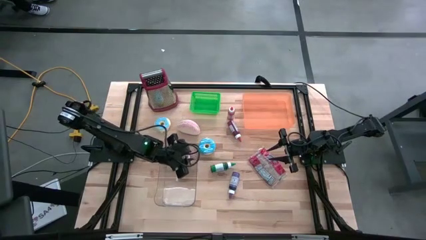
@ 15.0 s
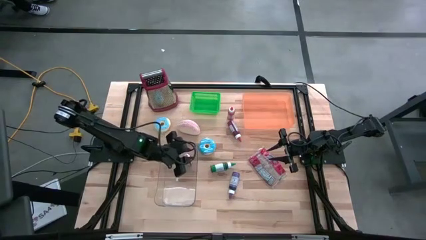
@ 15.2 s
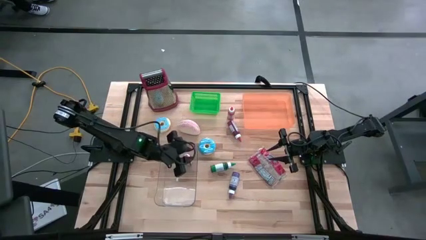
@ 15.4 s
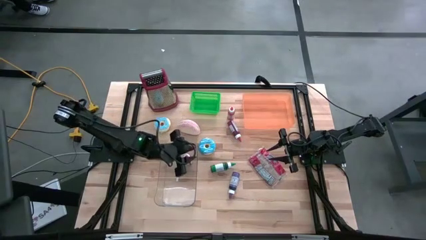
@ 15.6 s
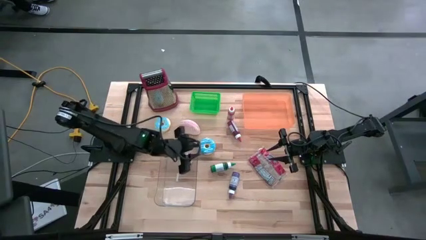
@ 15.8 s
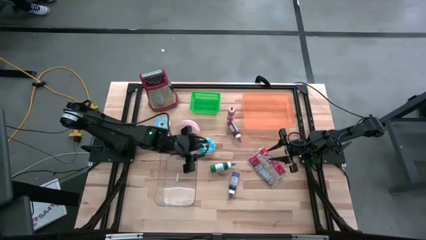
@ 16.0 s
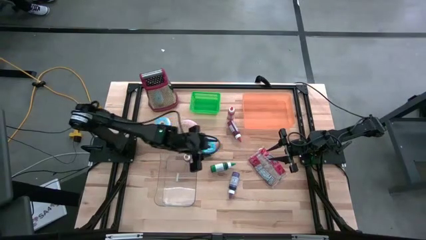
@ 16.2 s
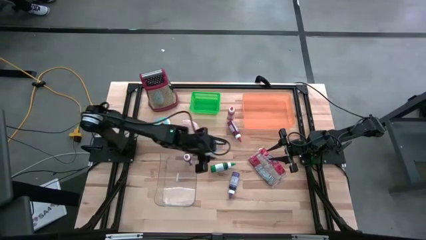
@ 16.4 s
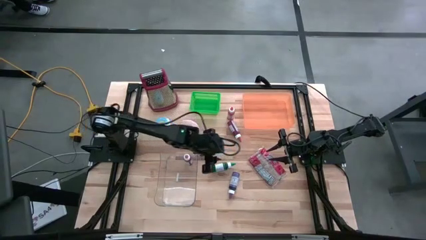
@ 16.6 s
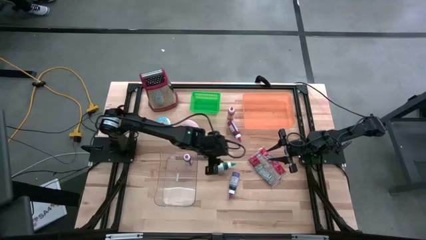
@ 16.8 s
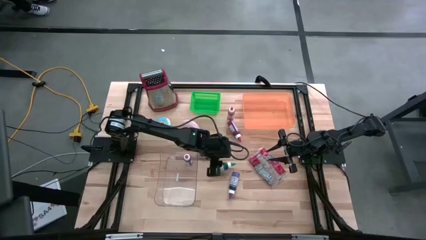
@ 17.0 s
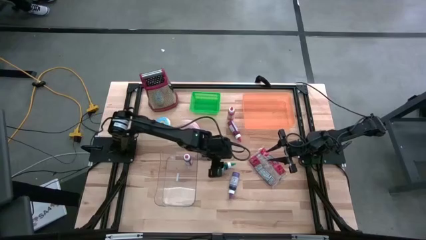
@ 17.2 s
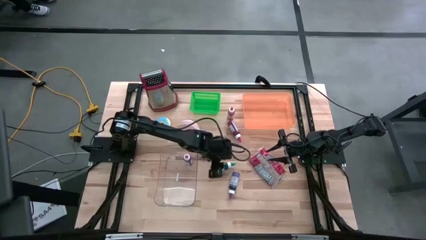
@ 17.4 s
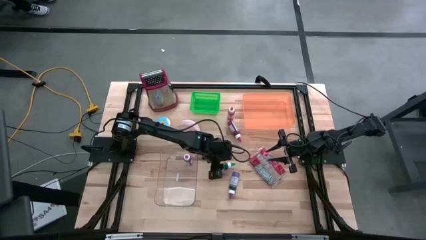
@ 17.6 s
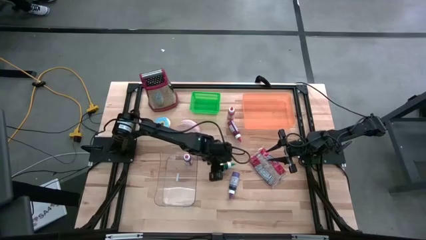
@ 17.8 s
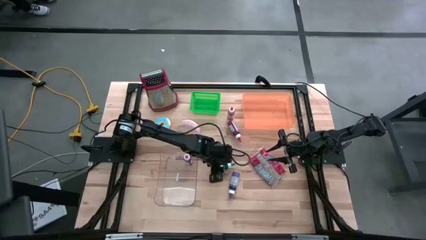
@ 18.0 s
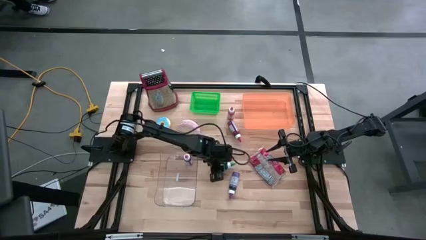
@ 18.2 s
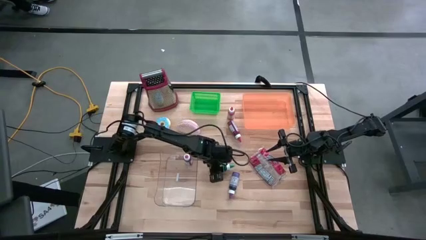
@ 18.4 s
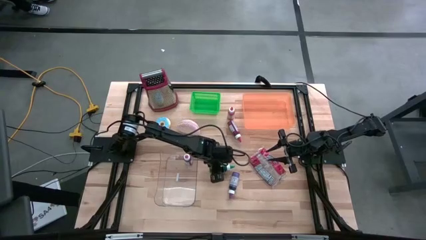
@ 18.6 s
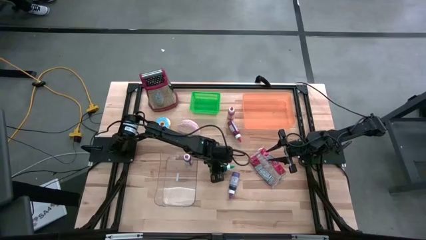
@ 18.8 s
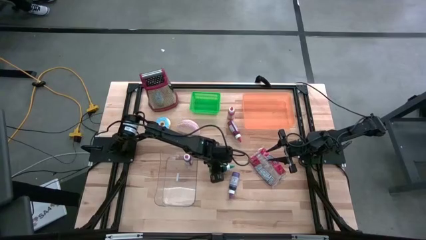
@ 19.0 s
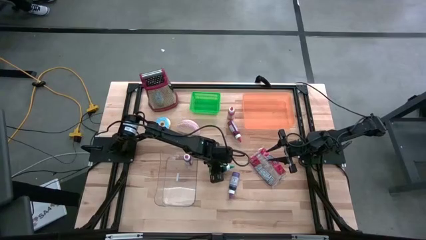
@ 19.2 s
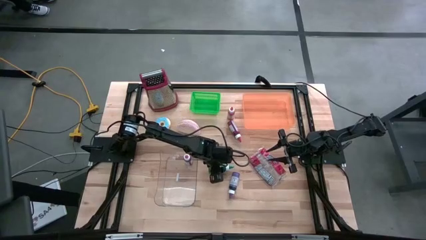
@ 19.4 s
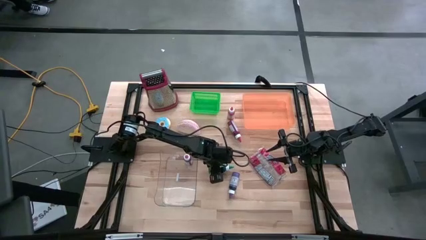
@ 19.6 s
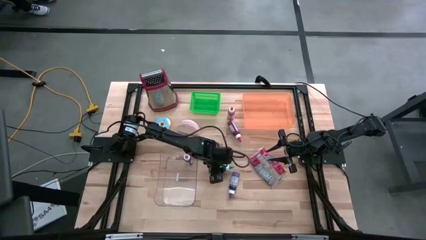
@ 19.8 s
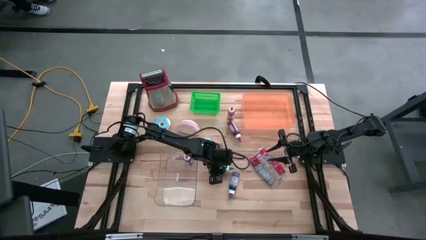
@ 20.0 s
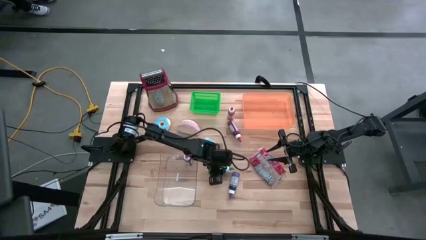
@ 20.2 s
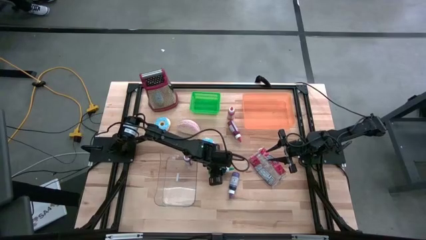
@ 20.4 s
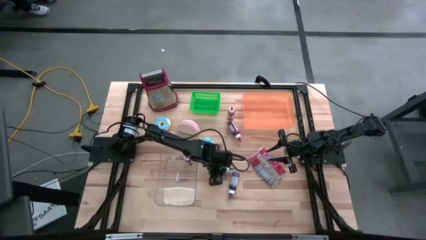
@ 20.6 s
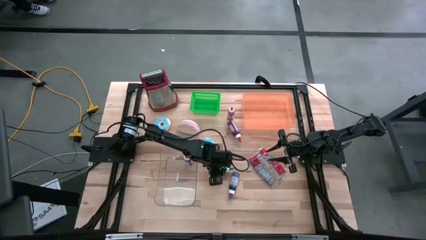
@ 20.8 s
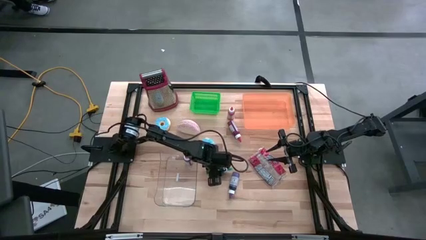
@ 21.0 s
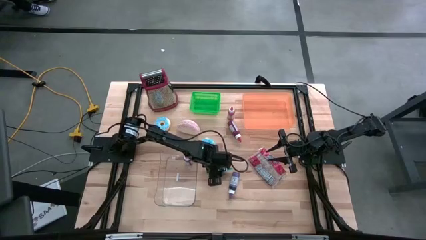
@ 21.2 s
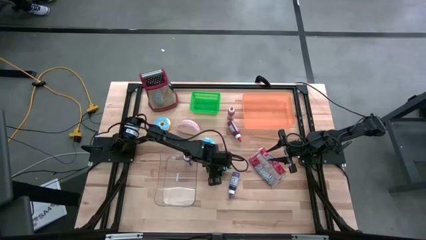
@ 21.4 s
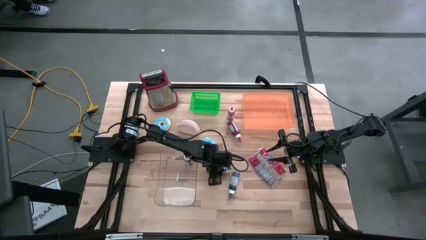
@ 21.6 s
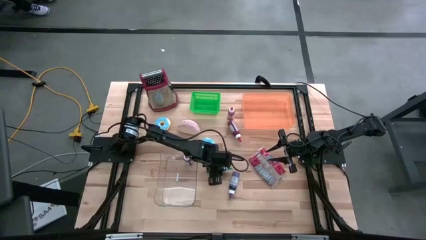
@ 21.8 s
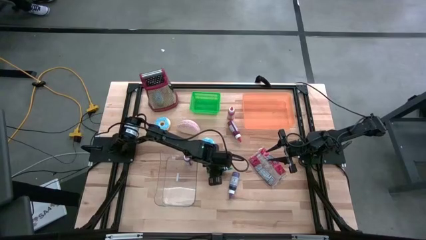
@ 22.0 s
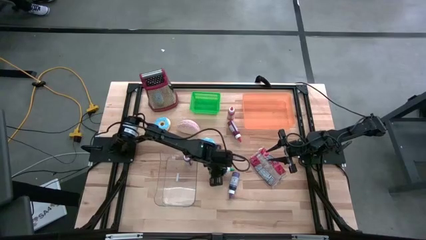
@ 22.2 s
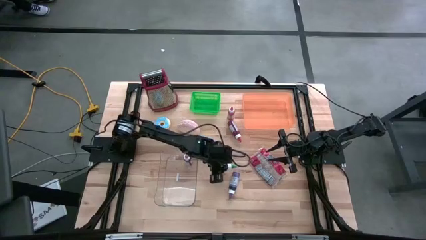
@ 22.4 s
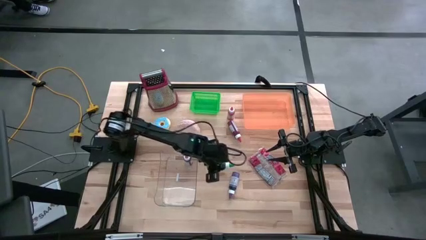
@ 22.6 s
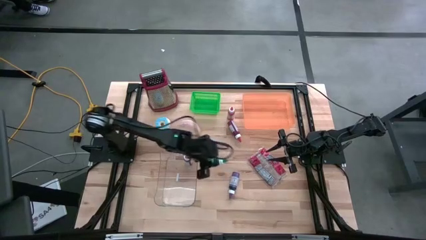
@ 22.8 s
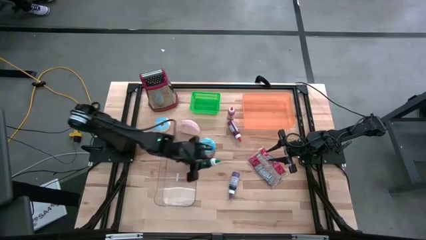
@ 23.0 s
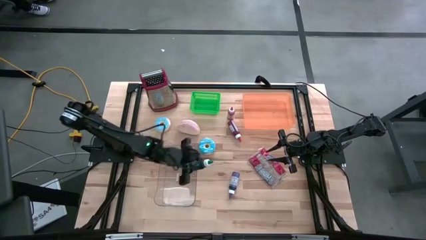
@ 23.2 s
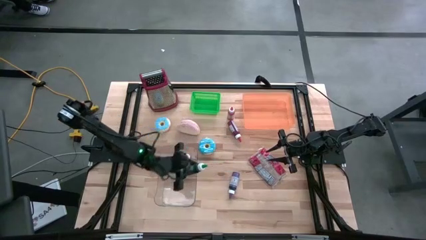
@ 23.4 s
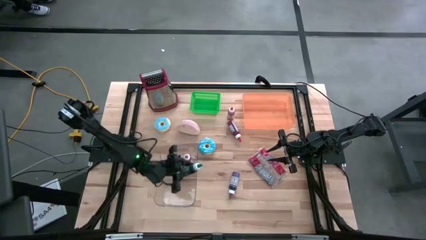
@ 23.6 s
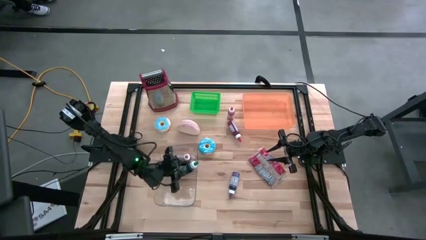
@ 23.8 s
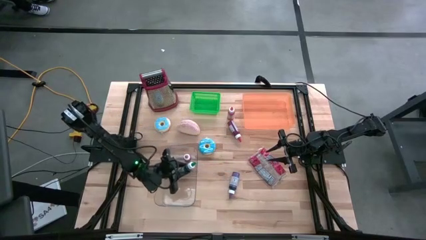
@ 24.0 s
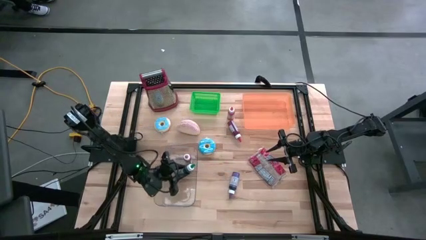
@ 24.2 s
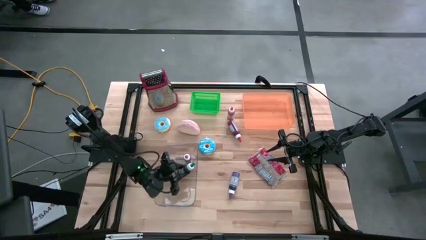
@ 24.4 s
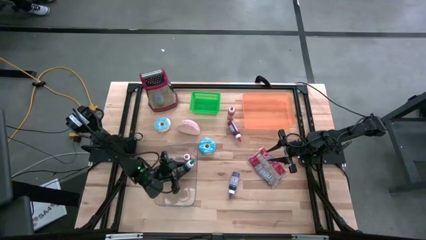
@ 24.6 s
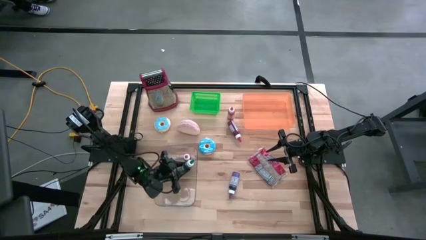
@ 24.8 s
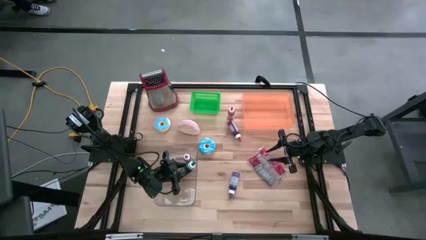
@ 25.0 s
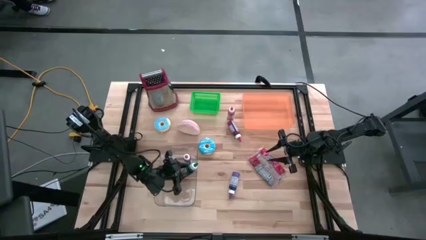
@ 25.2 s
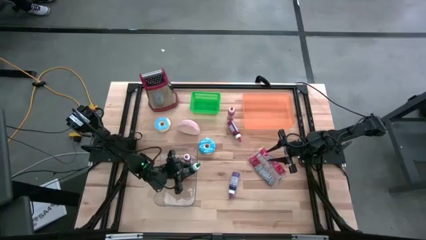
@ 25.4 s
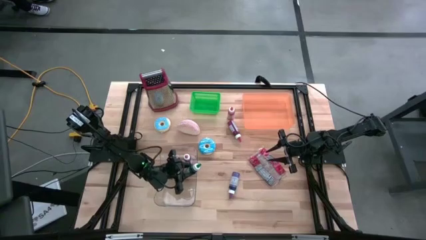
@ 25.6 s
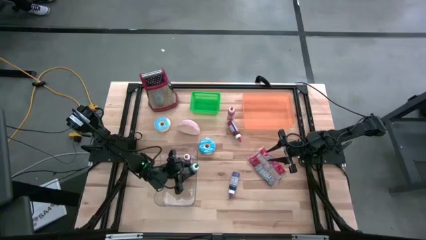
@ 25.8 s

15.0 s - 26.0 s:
Put the green food coloring bottle into the transparent bin
